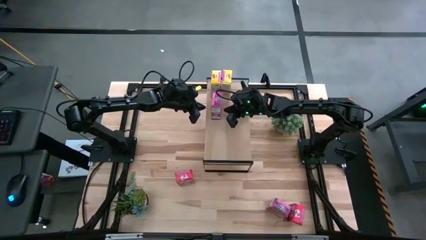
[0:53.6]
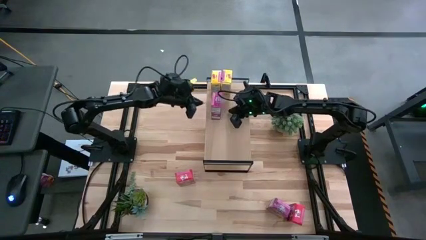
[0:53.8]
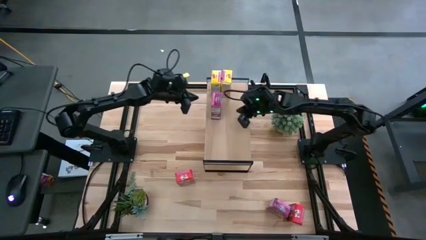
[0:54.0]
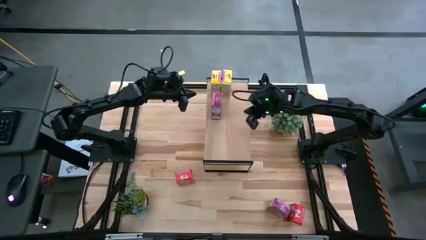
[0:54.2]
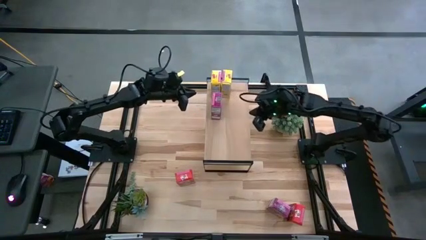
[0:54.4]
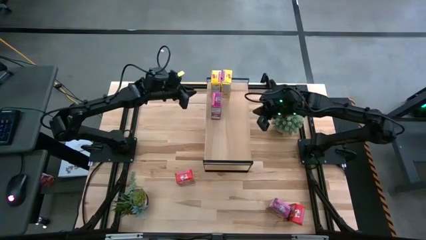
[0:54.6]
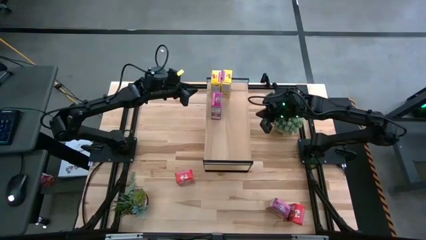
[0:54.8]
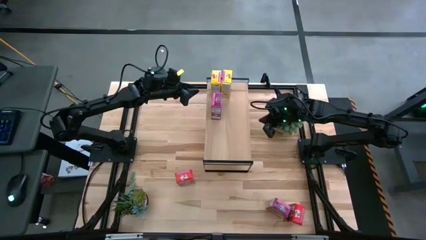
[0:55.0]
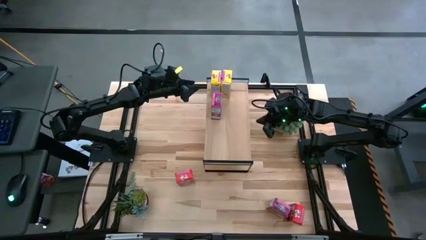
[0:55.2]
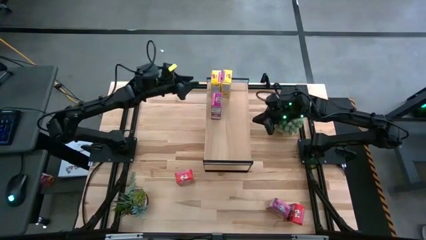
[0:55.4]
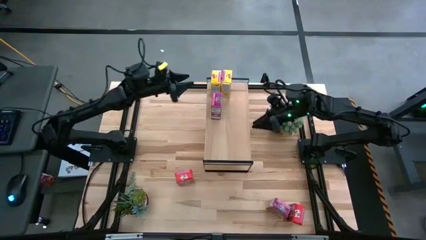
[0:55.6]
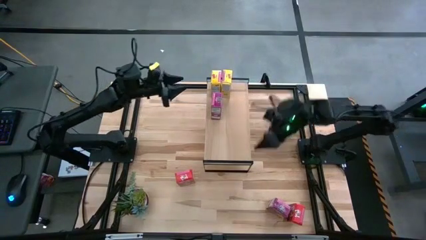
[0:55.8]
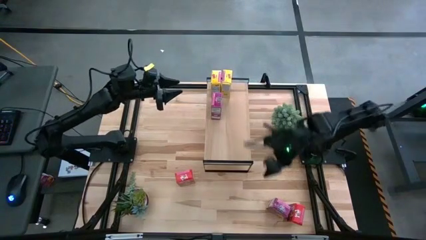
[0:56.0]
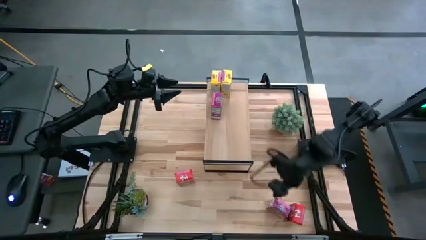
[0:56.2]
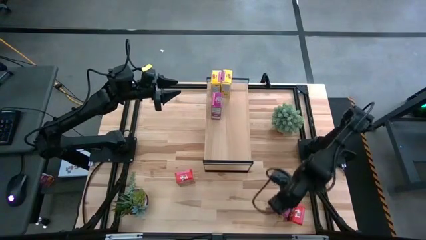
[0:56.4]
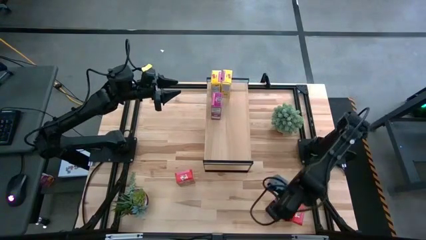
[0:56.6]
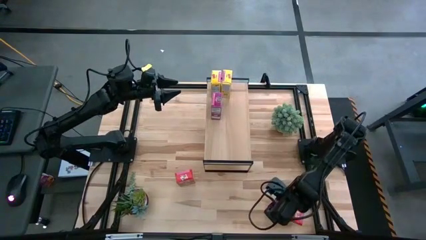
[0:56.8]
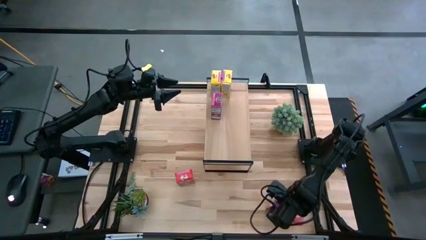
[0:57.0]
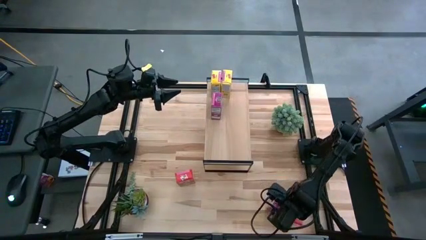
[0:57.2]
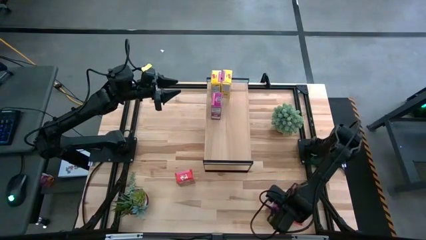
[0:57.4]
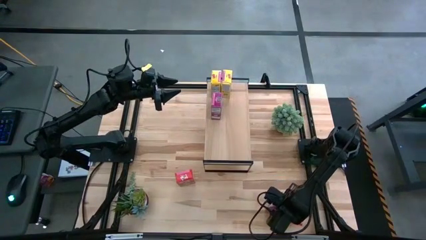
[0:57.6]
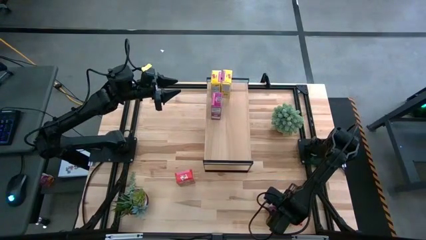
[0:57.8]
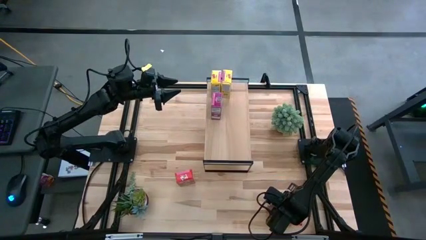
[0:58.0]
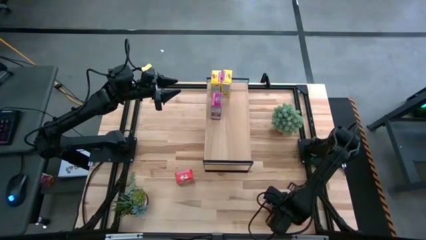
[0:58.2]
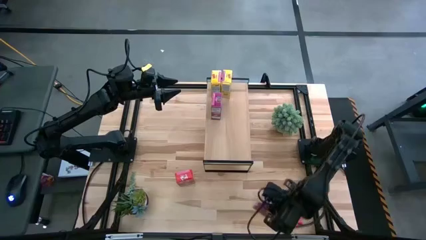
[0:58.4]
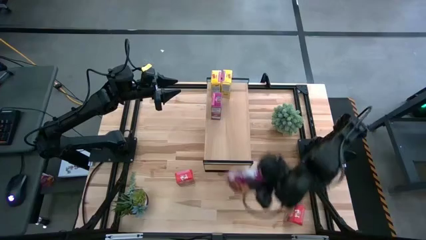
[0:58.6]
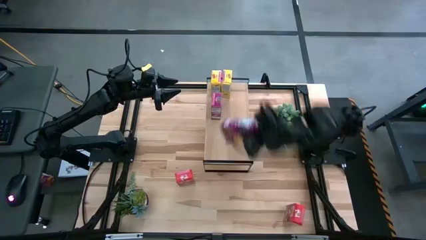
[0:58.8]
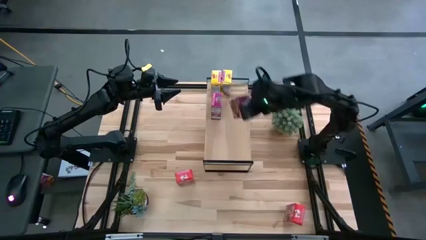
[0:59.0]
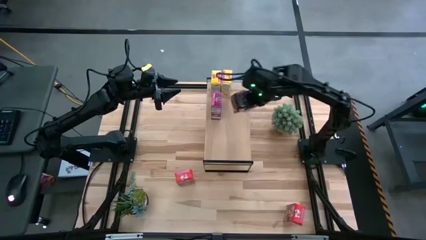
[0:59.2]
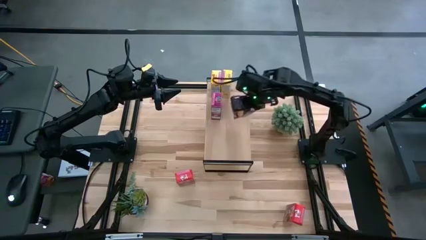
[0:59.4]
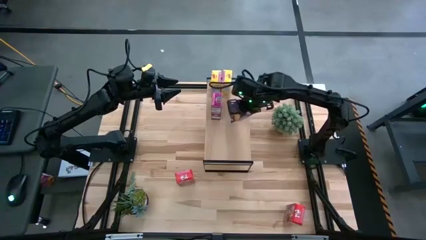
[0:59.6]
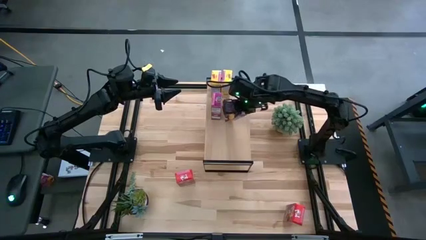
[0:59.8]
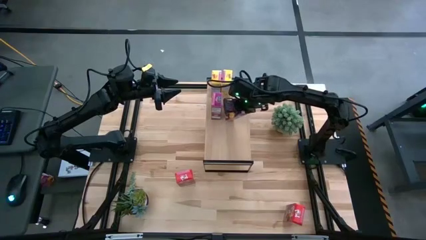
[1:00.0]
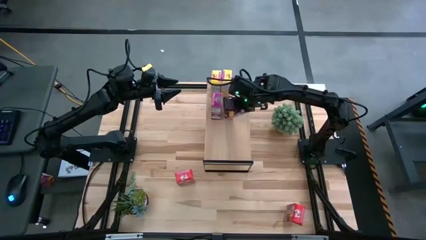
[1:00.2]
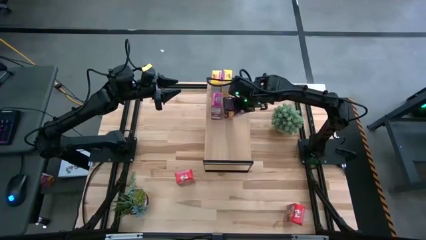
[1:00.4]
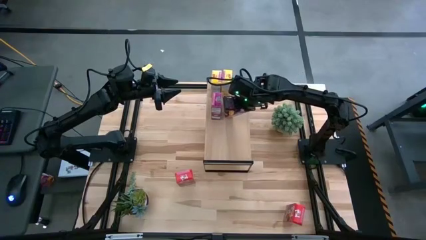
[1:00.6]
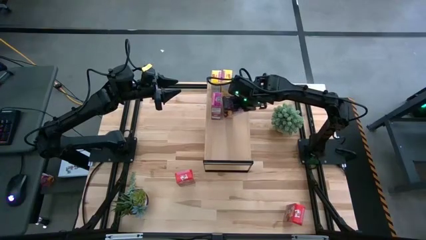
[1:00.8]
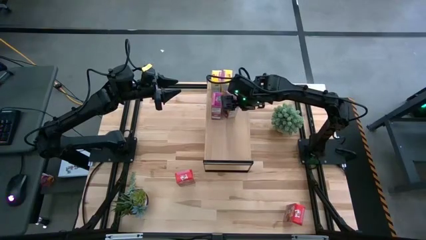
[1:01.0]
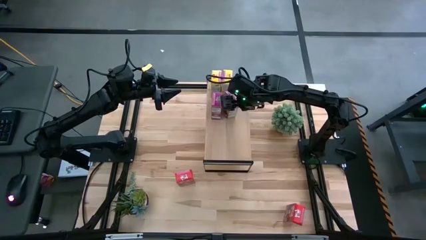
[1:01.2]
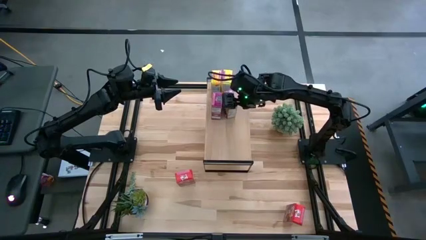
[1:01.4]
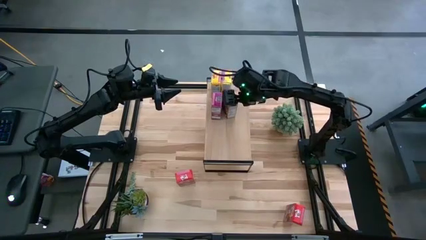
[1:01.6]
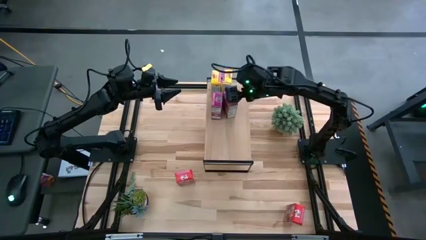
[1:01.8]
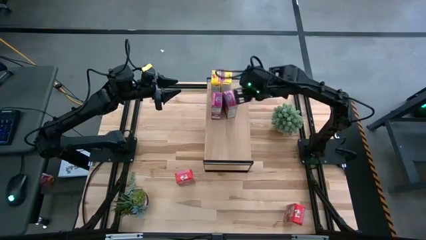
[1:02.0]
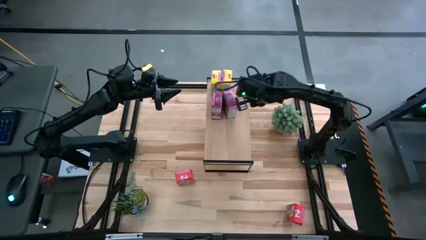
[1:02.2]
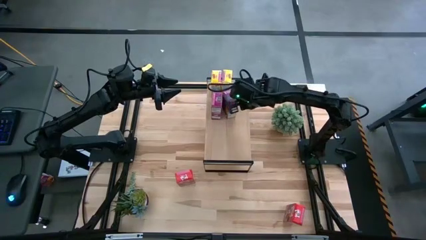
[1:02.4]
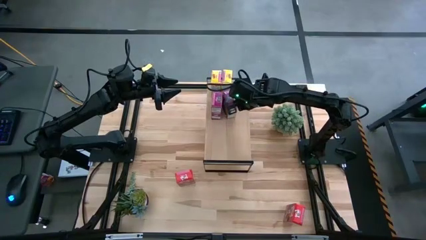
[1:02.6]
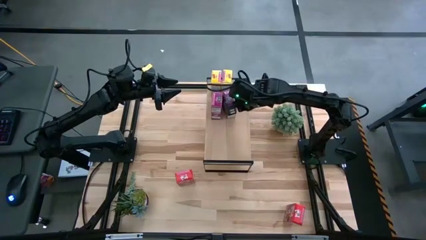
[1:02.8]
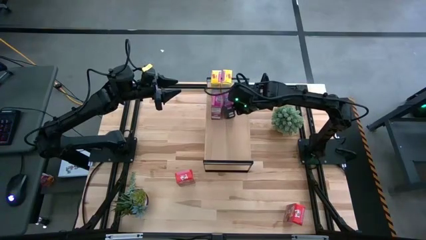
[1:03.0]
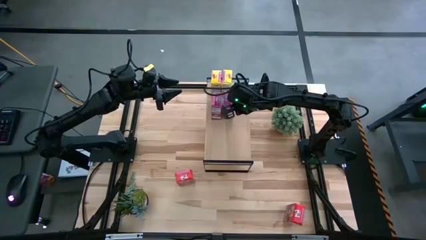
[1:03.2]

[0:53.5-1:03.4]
Task: Stack cereal on shelf
Align the violet cereal box with the other violet cereal box on the shelf

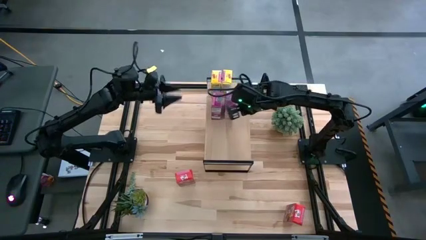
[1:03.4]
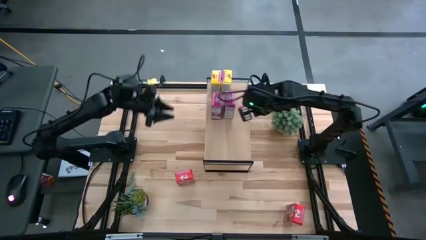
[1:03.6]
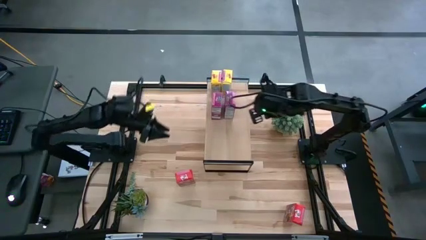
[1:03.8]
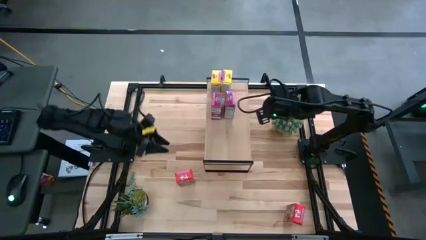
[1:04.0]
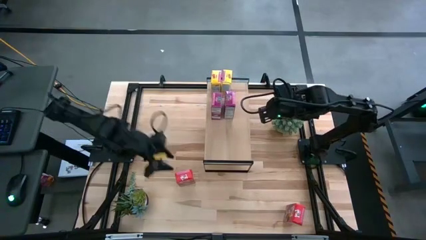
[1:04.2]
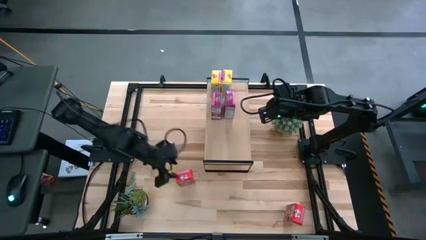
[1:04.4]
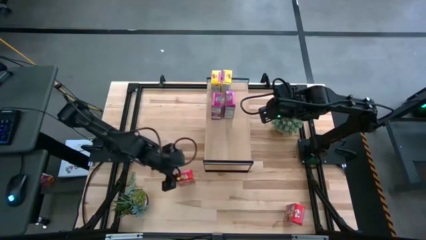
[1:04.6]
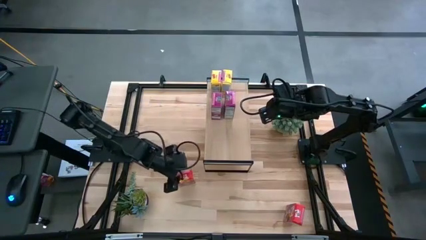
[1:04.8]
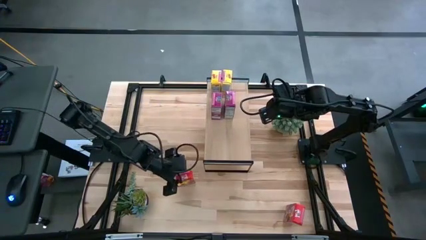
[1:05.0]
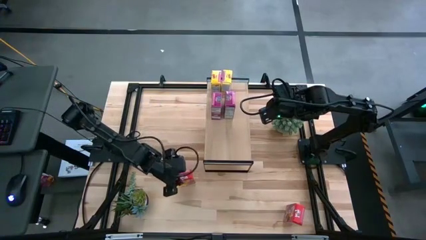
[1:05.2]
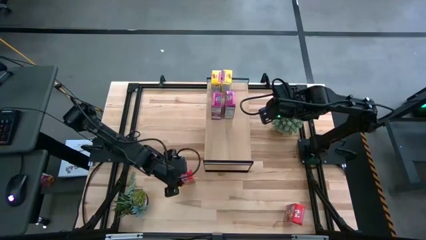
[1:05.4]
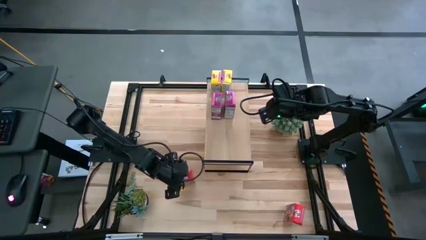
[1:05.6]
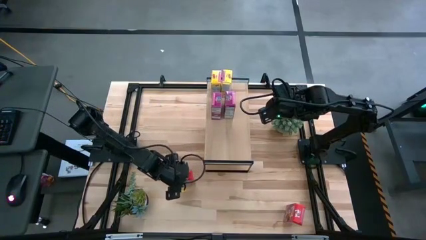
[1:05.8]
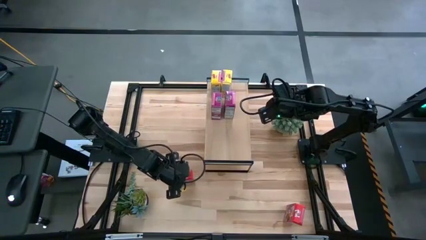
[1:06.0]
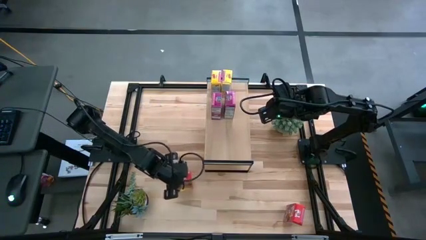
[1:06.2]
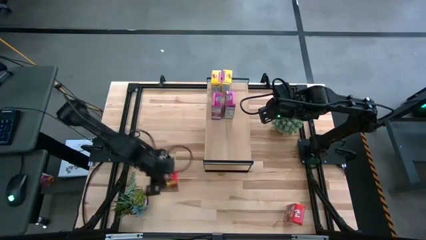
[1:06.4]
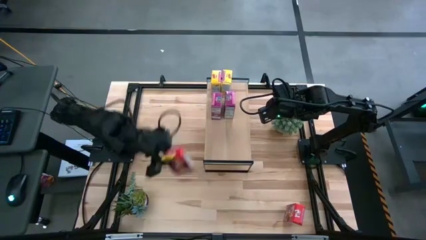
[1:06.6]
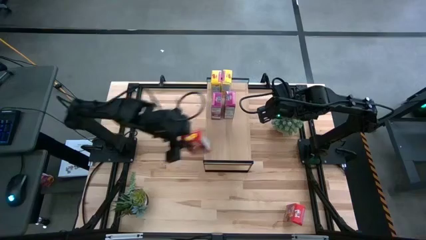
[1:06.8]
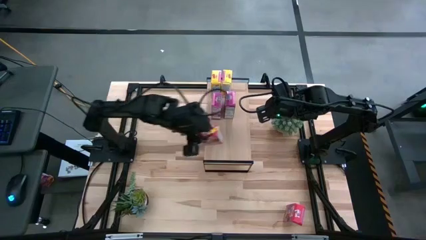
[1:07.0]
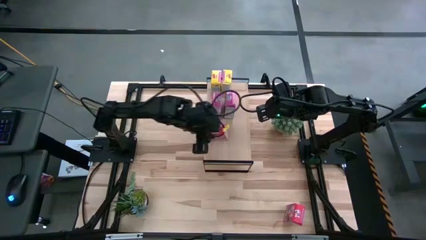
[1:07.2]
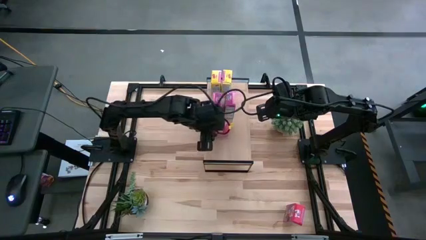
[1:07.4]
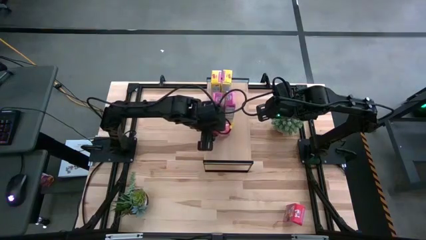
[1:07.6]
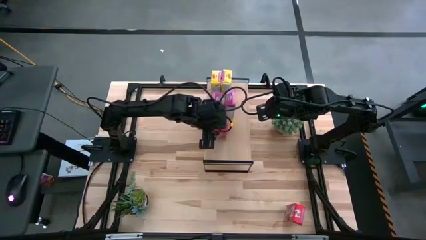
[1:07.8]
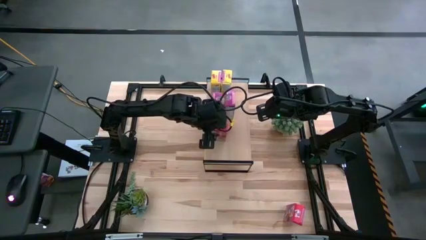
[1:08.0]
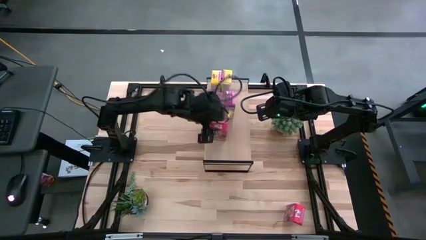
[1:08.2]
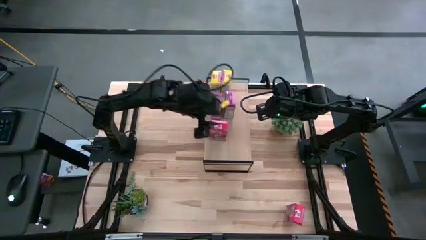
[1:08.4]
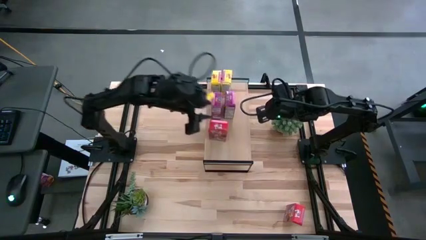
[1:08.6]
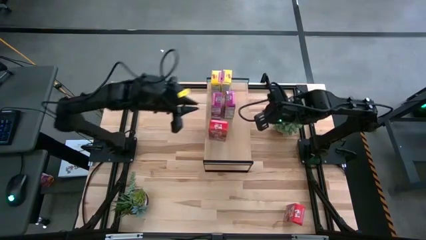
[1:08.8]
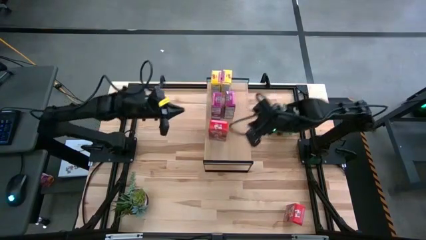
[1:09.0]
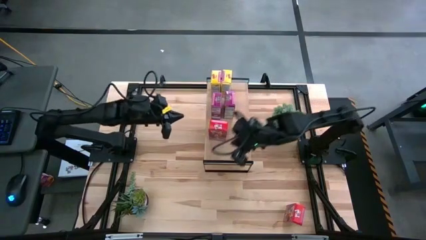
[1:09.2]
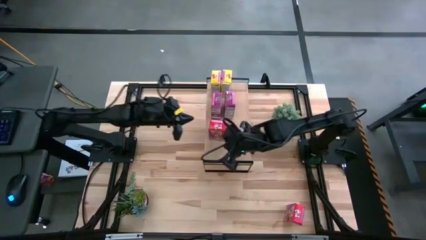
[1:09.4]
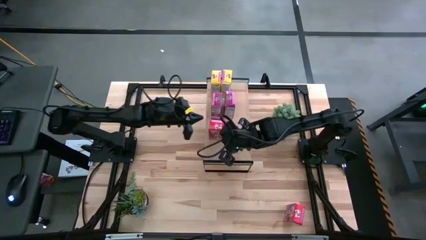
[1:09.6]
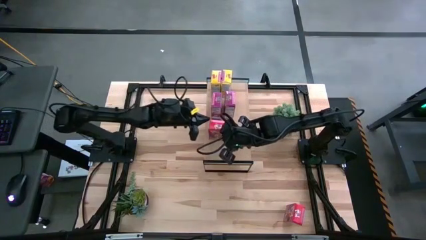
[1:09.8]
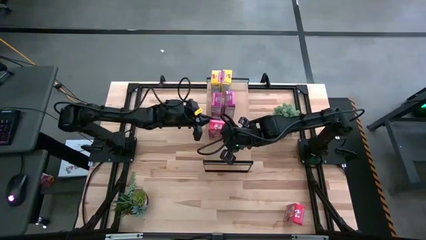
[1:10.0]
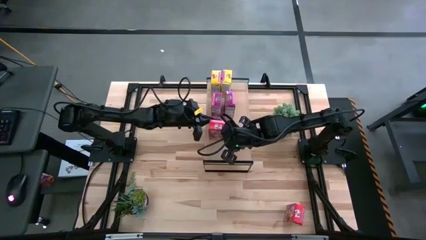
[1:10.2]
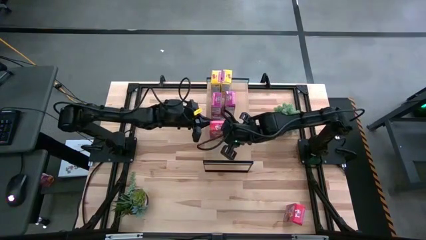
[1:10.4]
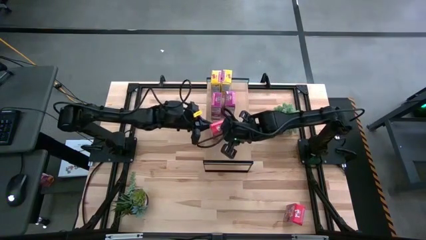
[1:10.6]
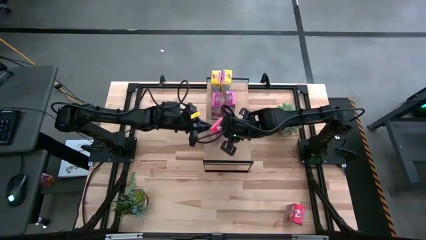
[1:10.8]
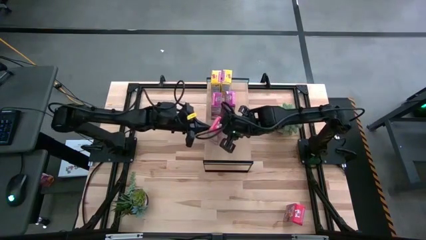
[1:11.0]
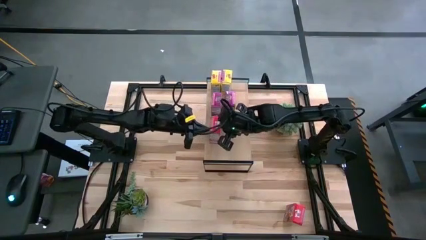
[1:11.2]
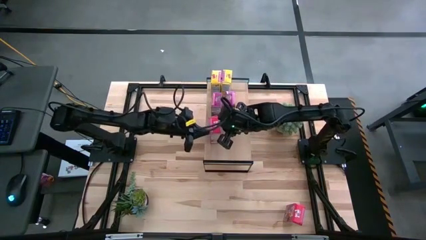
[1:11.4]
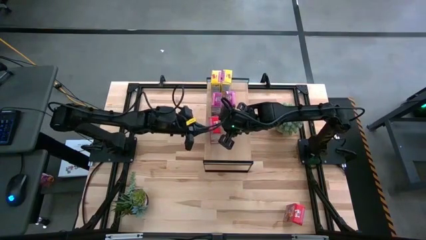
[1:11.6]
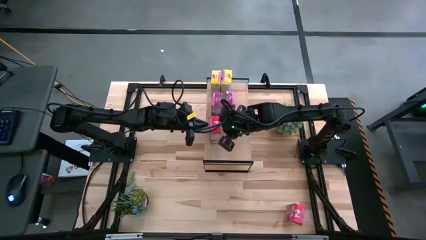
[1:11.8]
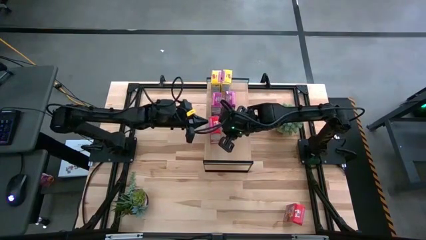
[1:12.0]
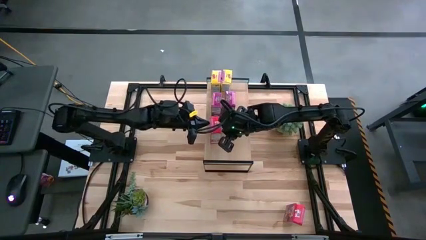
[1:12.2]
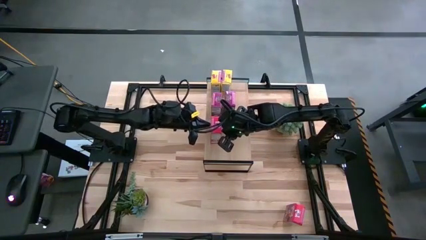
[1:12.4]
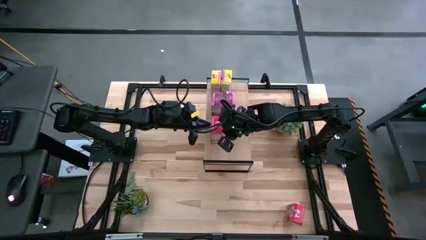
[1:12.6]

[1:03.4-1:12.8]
Put the left red cereal box on the shelf
